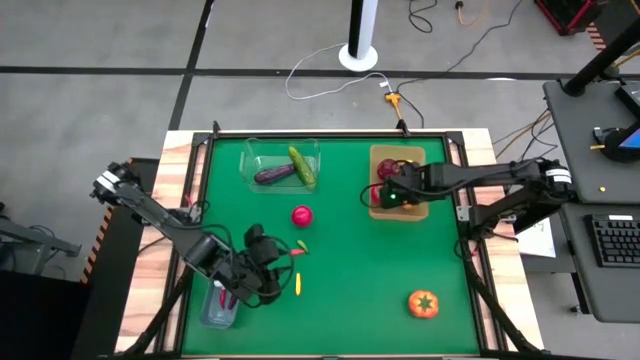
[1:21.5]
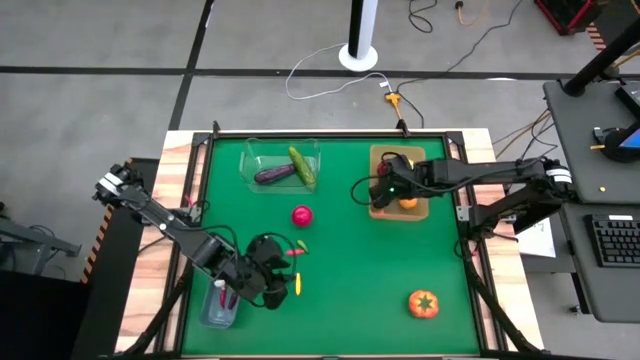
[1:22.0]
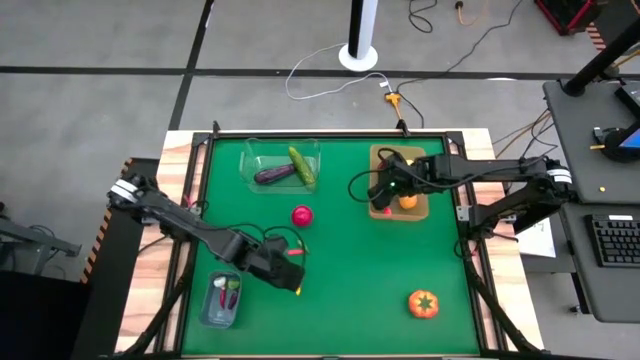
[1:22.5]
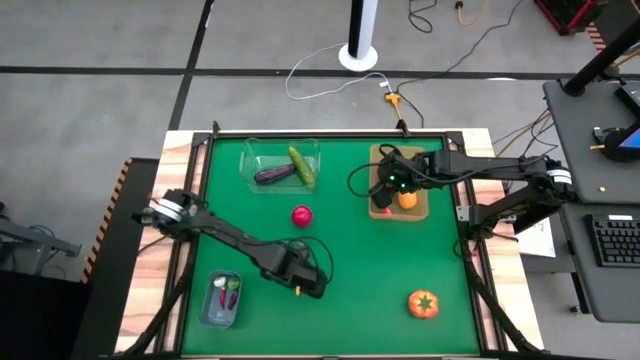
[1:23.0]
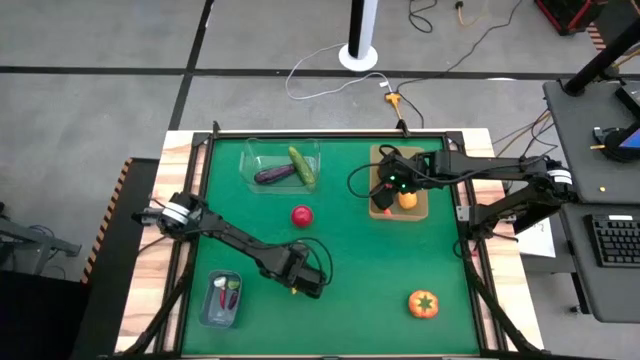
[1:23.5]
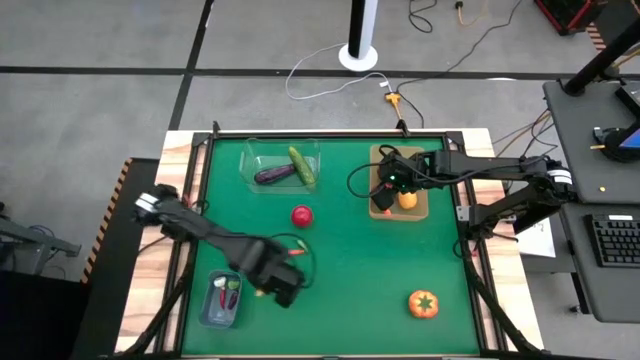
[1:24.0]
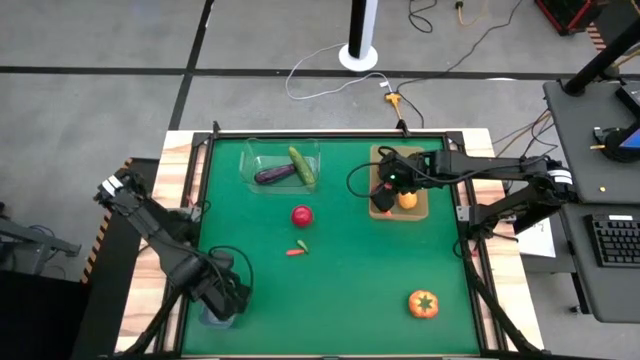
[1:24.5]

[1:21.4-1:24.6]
Task: Sort produce into baskets
Put the yellow corn into the blue bin

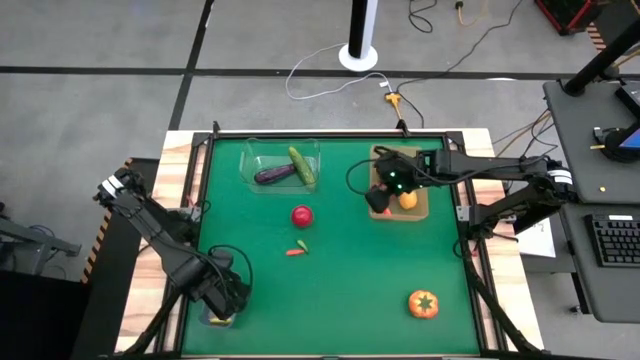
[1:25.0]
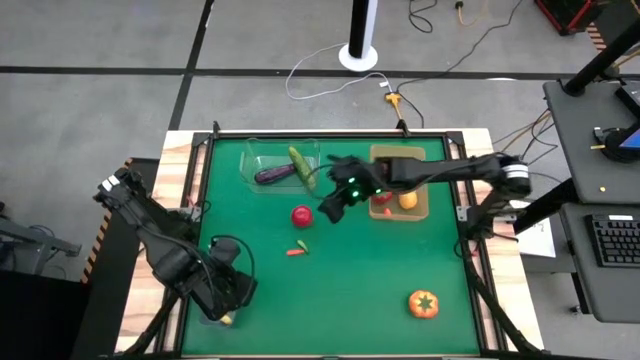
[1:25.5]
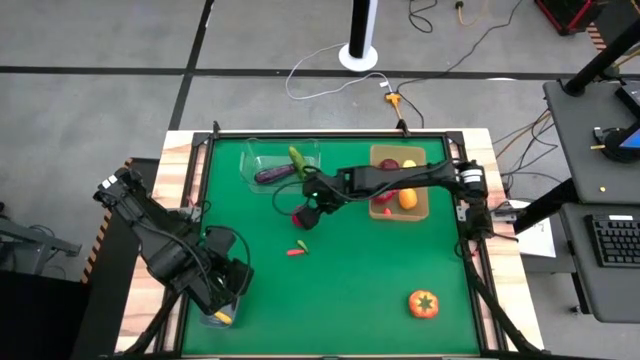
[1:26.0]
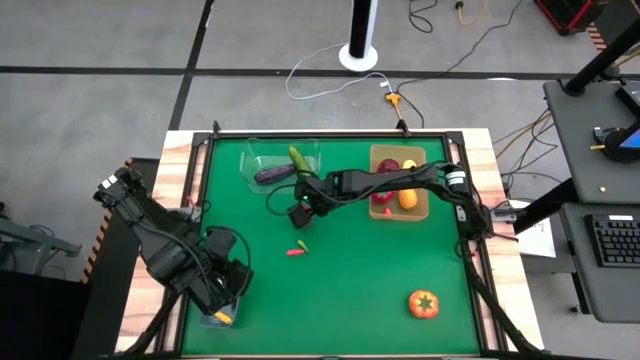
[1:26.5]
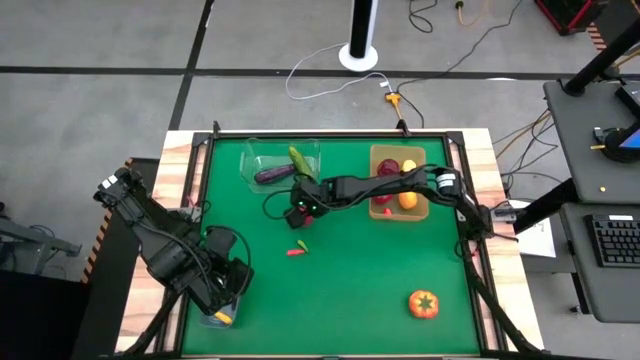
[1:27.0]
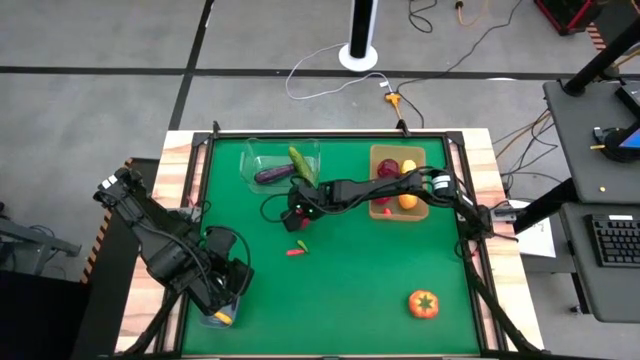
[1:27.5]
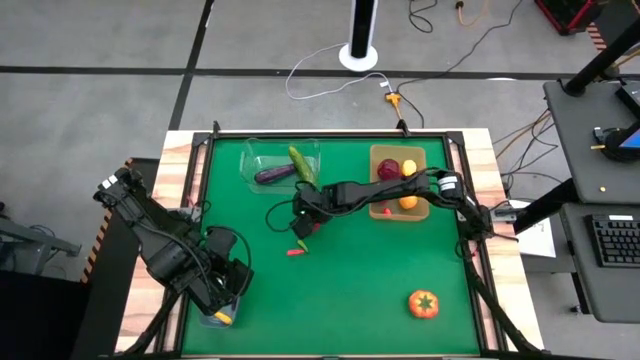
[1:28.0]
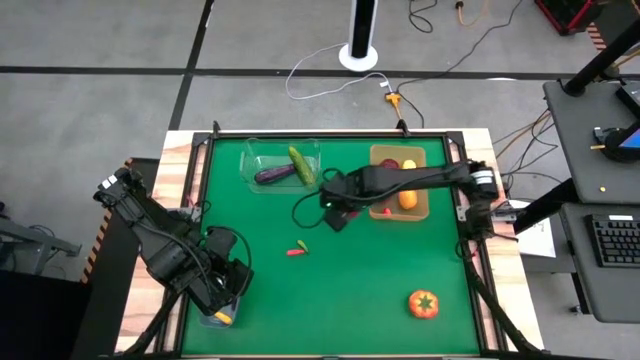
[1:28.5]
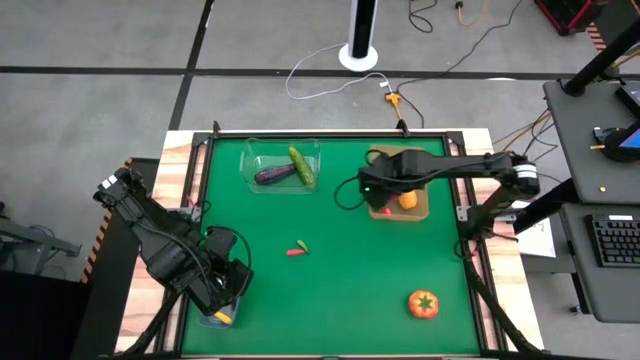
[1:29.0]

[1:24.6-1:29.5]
Put the red tomato into the orange bin

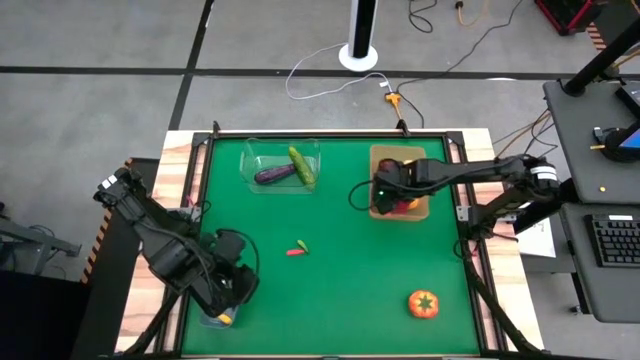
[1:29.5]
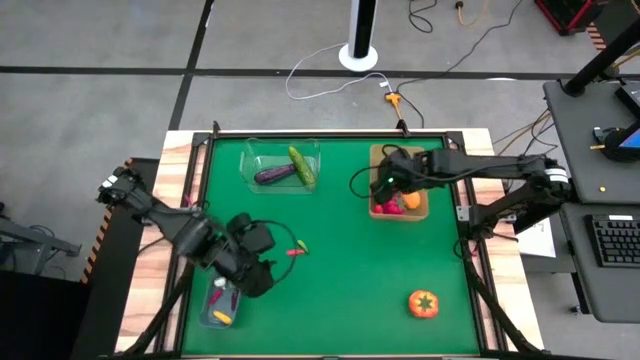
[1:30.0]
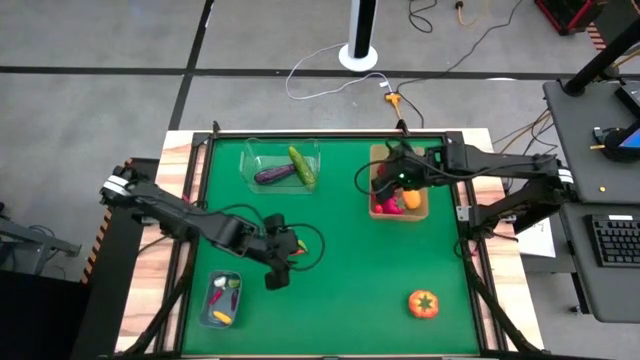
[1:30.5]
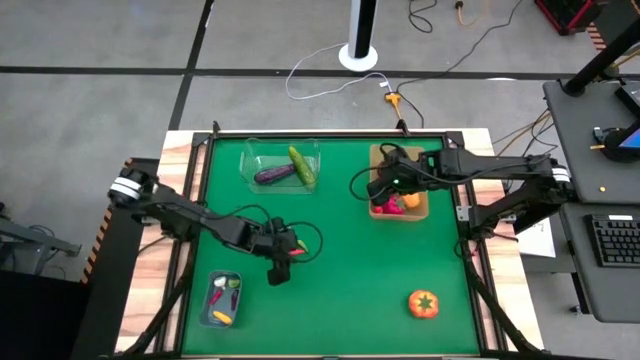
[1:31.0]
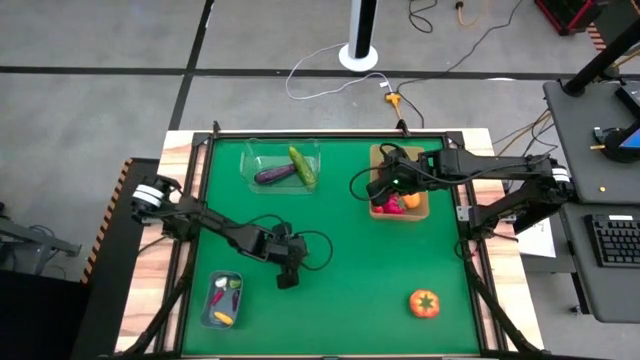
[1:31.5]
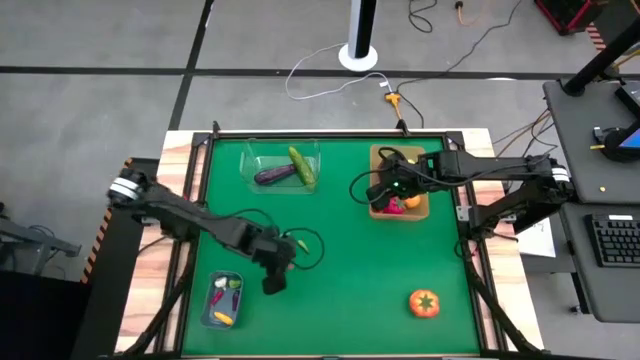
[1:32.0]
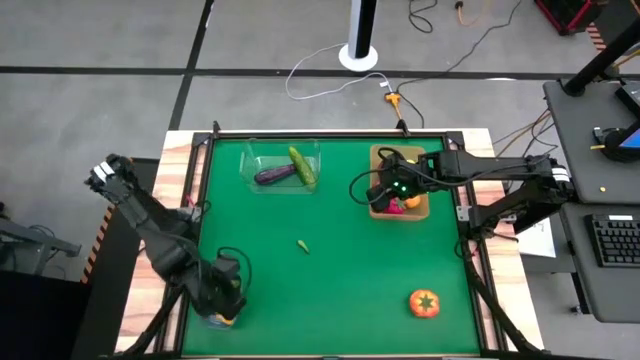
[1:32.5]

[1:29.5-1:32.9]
Put the red chili pepper into the blue bin

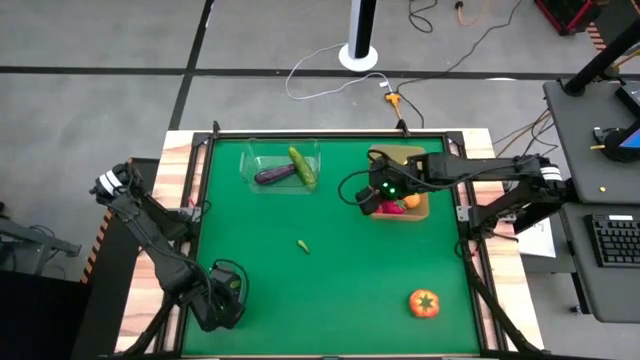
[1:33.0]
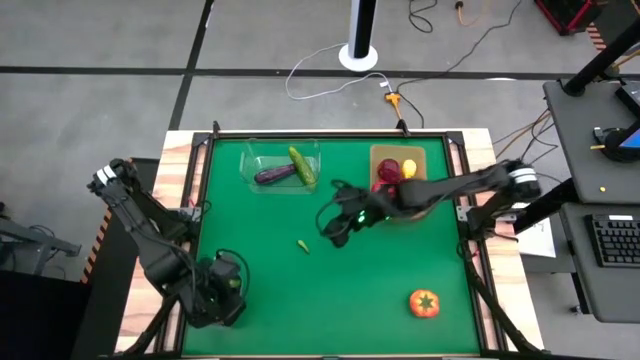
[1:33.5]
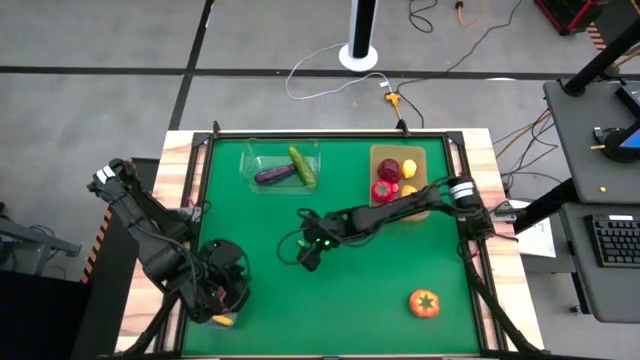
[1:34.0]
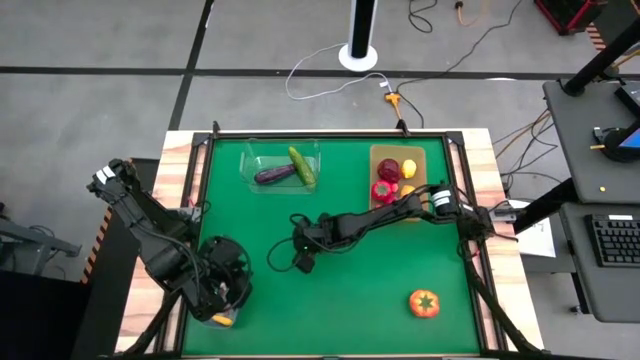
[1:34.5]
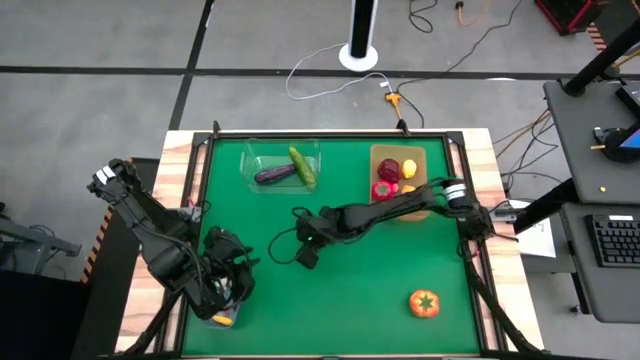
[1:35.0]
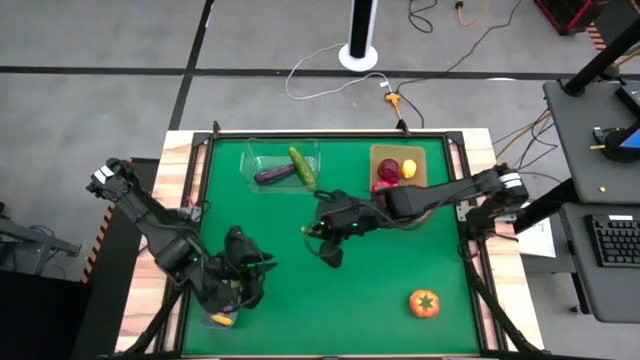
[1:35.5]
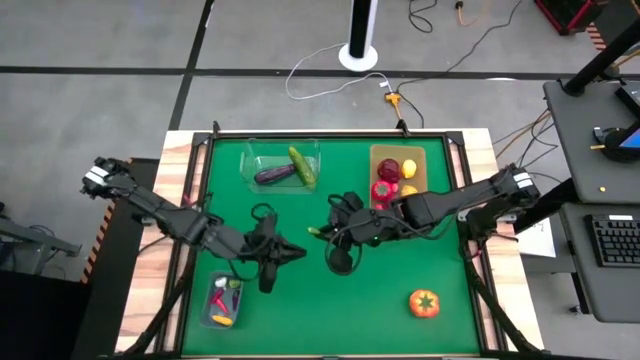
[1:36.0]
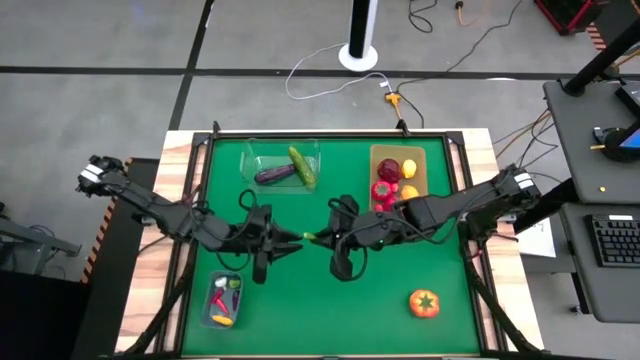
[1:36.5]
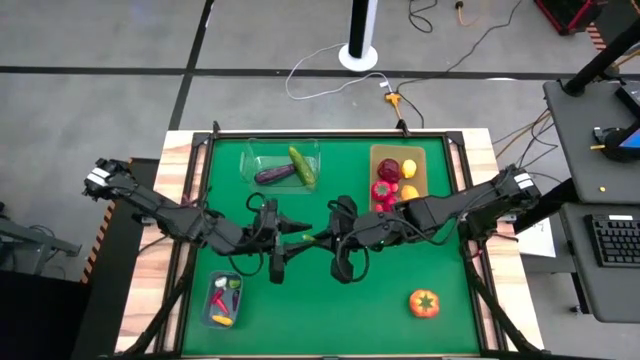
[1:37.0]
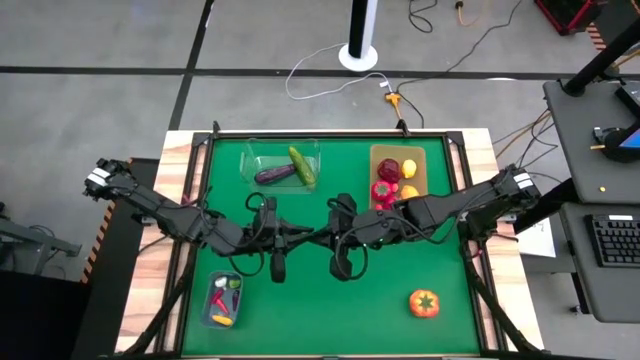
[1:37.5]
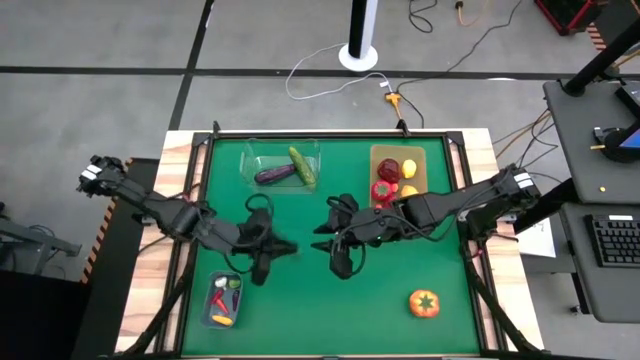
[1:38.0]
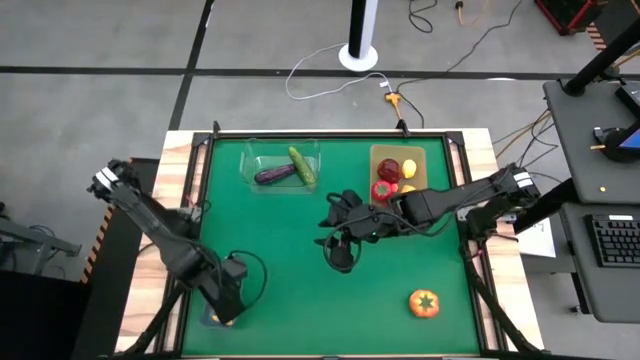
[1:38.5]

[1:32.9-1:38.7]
Put the green chili pepper into the blue bin

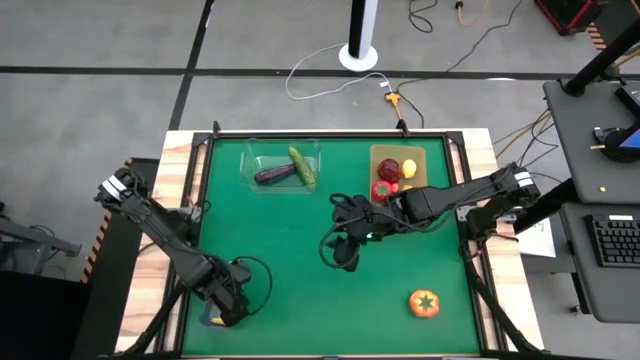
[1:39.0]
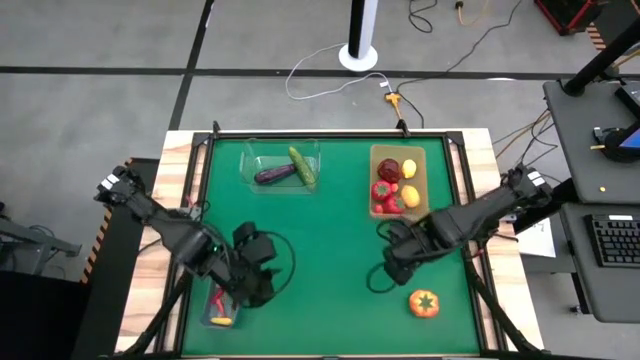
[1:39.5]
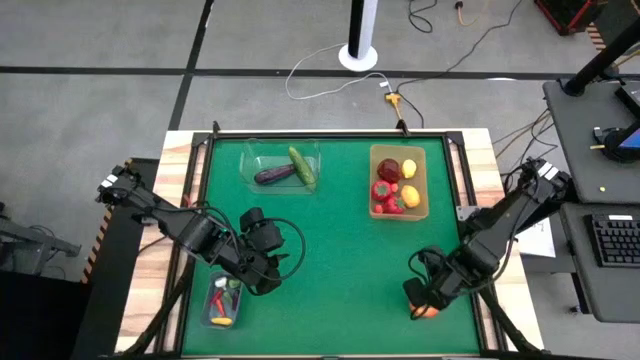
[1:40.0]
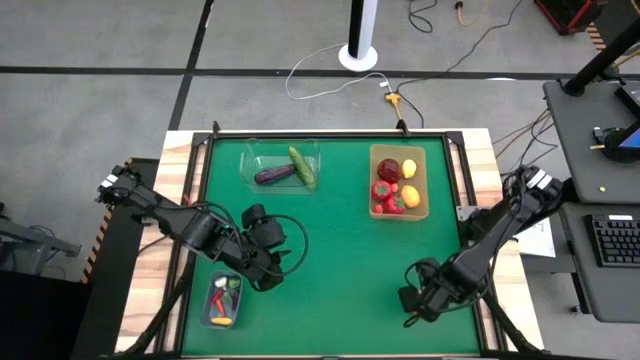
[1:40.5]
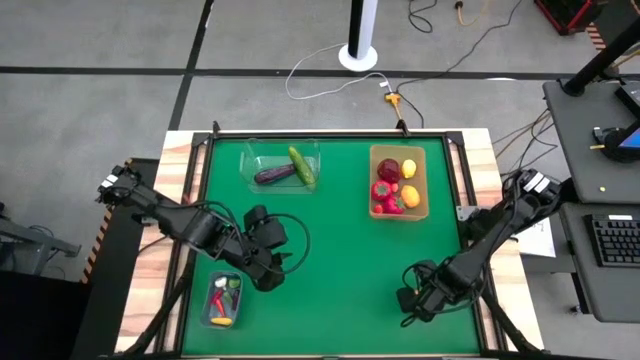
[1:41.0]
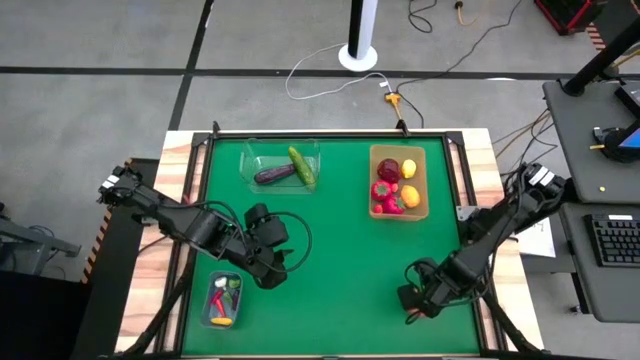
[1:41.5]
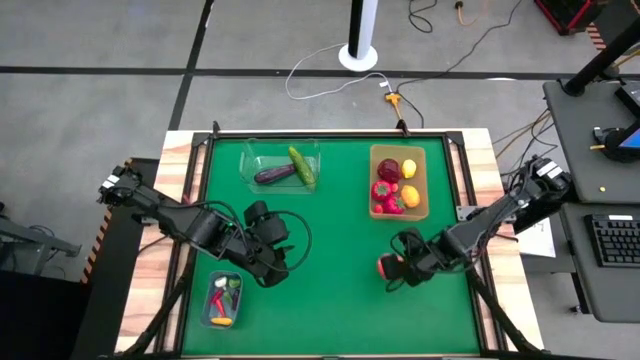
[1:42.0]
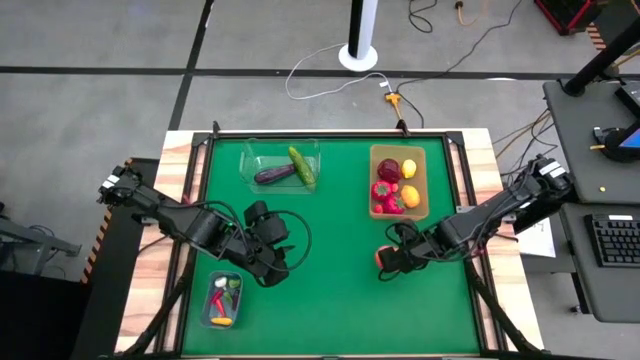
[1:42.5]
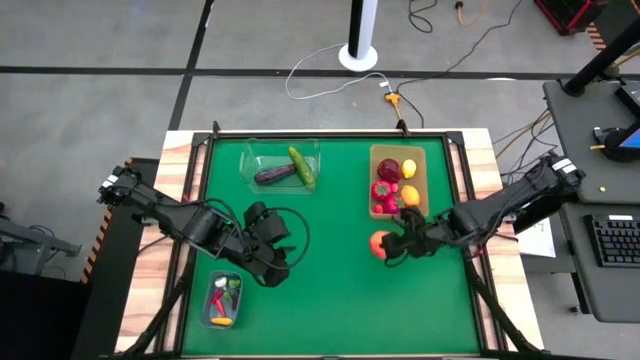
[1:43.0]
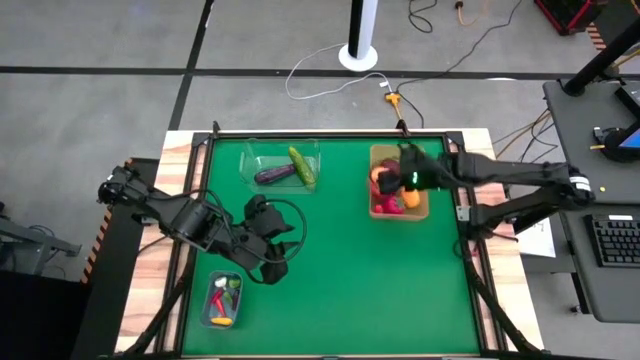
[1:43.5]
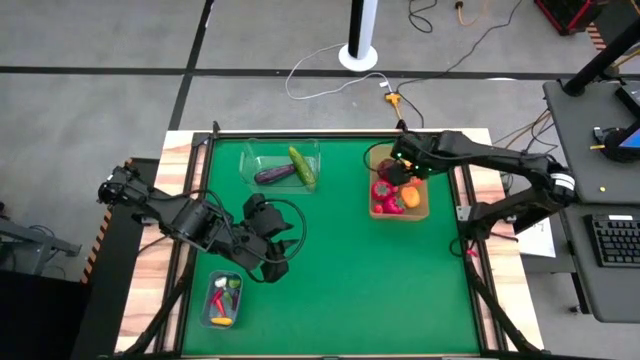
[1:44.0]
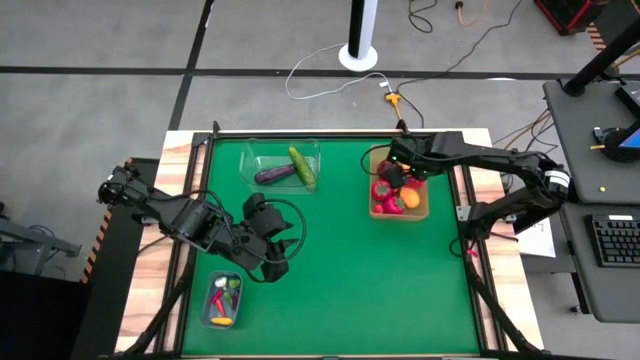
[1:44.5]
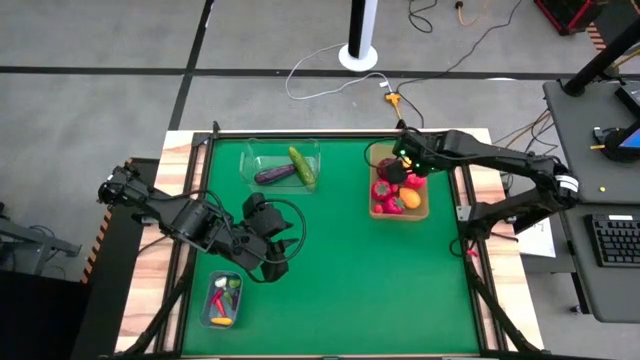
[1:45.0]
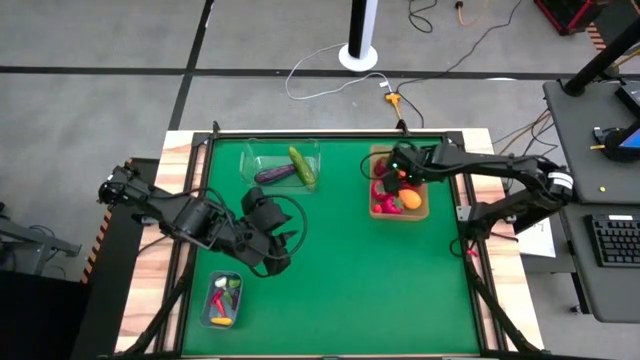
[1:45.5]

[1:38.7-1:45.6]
Put the orange tomato into the orange bin
